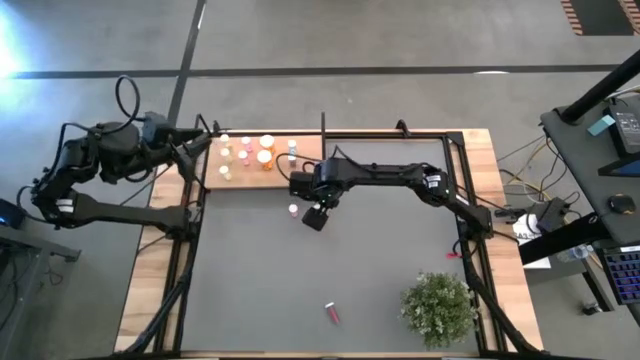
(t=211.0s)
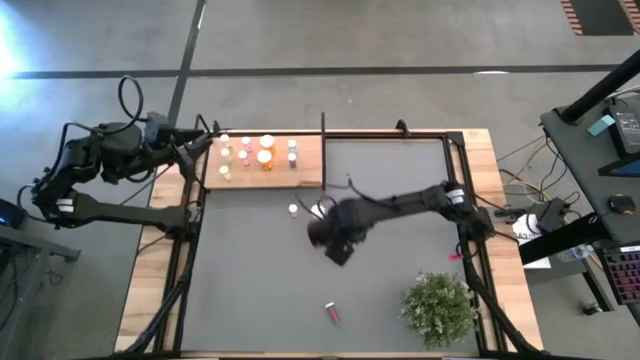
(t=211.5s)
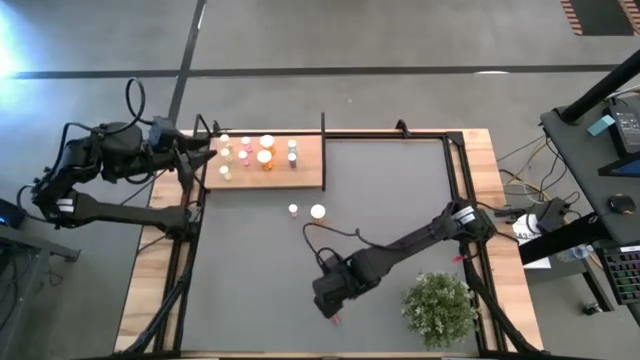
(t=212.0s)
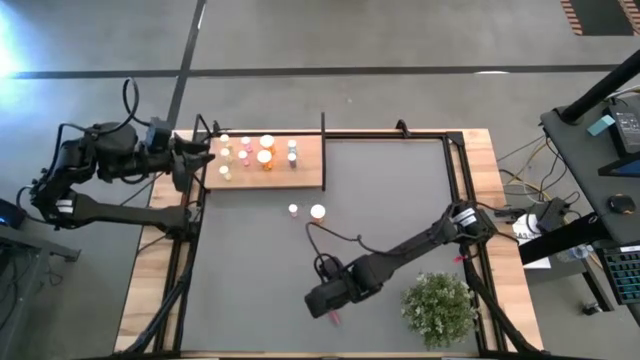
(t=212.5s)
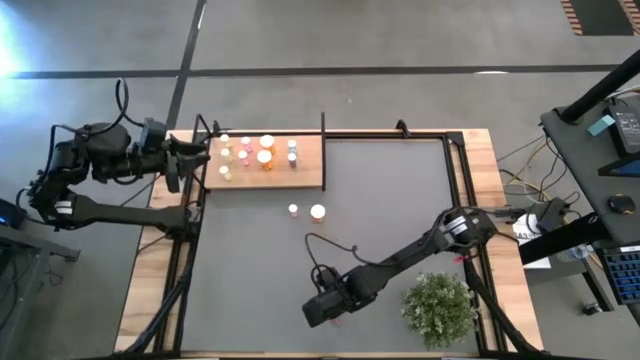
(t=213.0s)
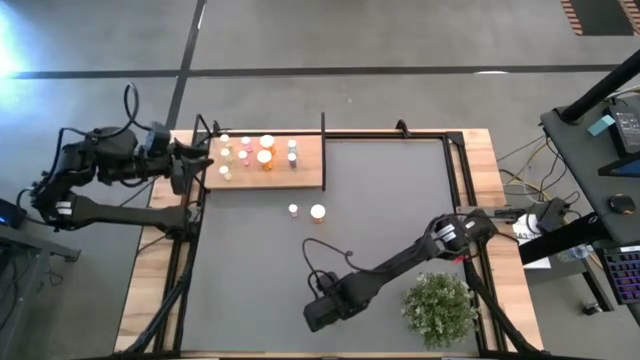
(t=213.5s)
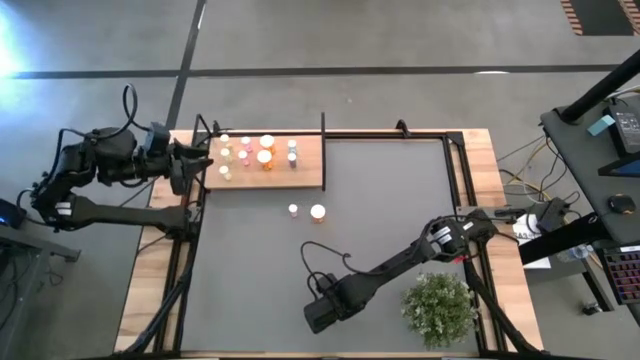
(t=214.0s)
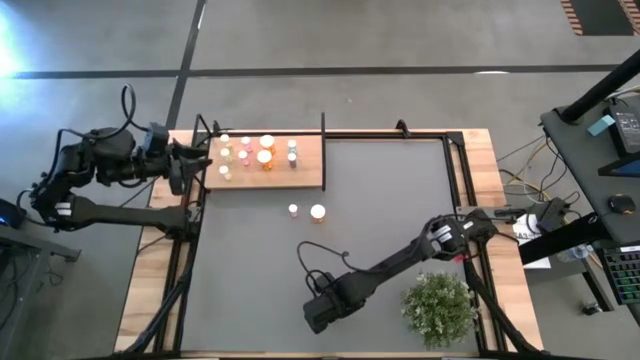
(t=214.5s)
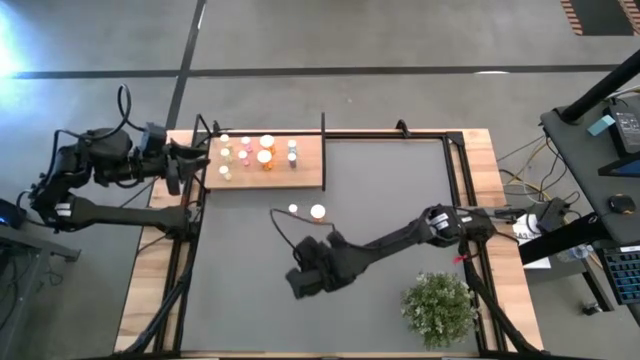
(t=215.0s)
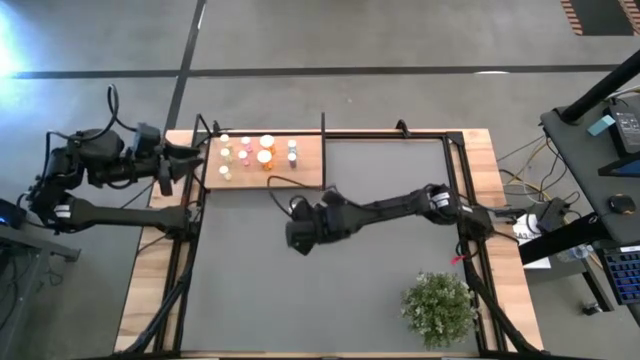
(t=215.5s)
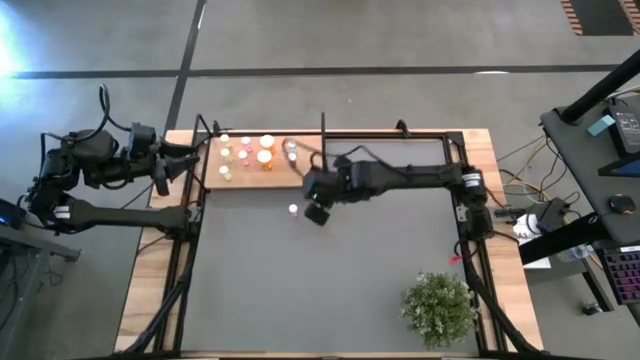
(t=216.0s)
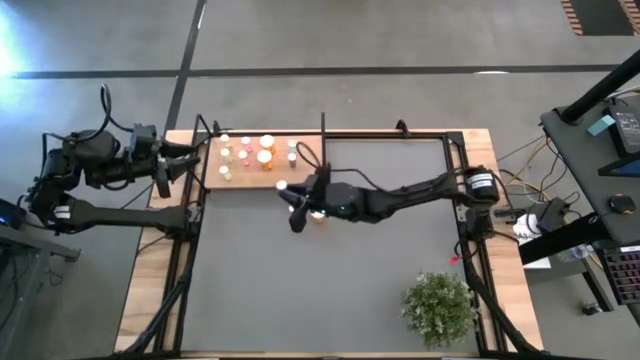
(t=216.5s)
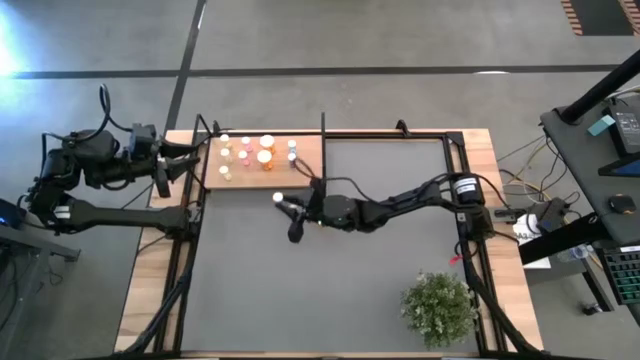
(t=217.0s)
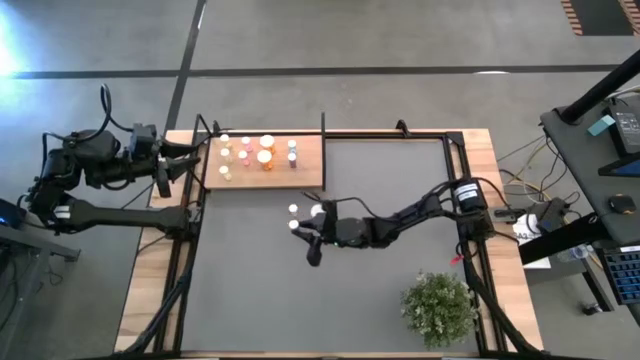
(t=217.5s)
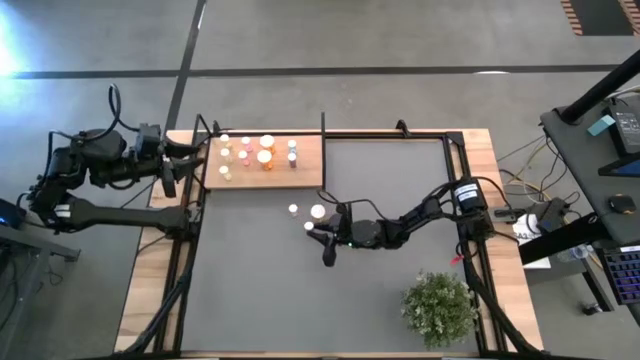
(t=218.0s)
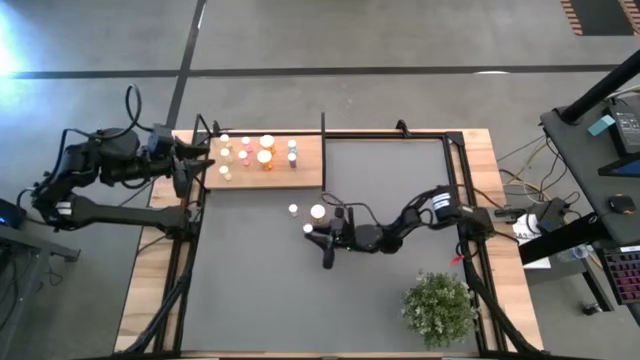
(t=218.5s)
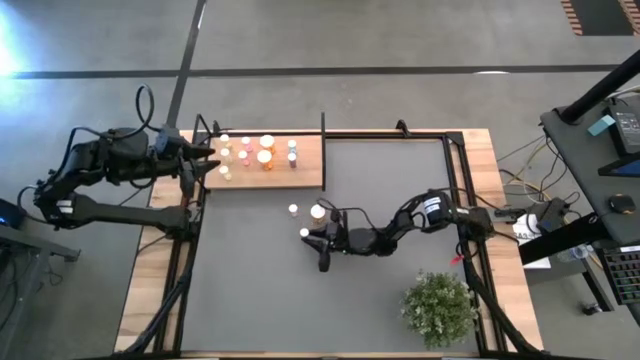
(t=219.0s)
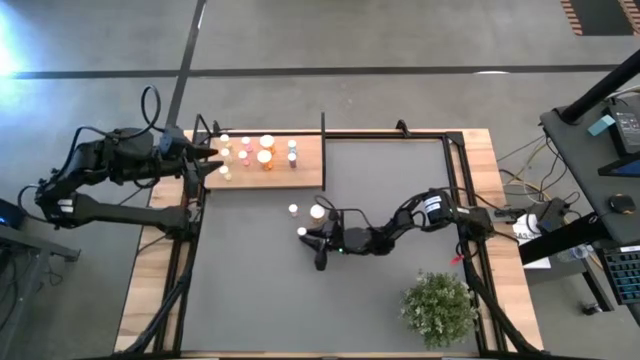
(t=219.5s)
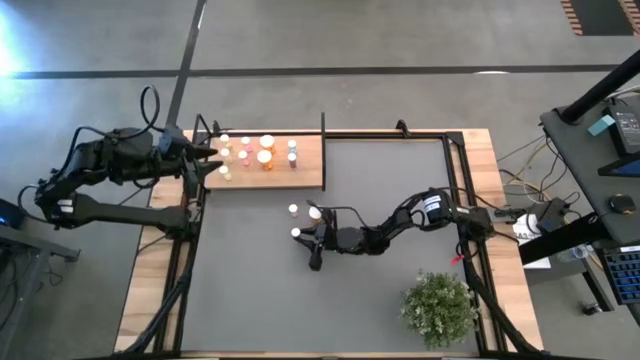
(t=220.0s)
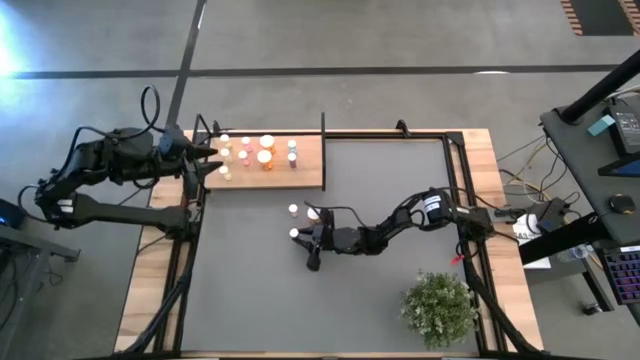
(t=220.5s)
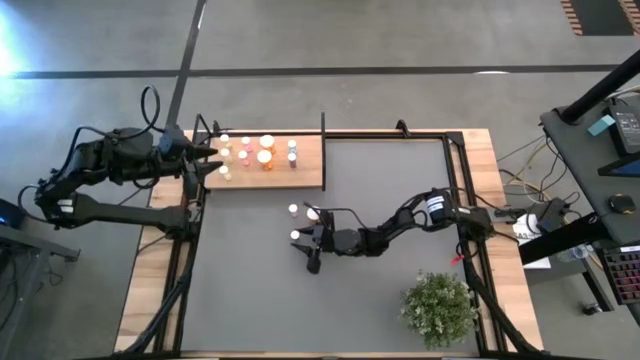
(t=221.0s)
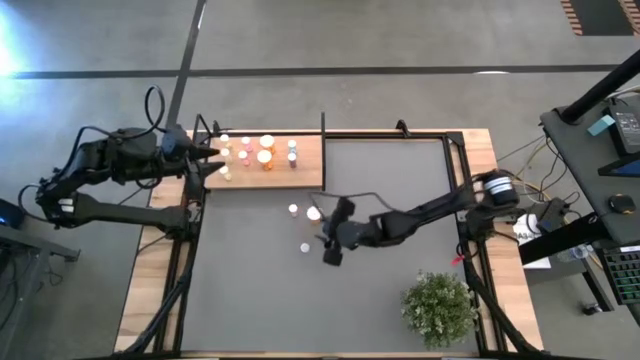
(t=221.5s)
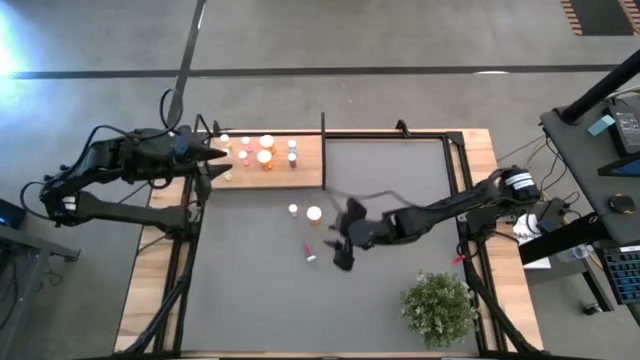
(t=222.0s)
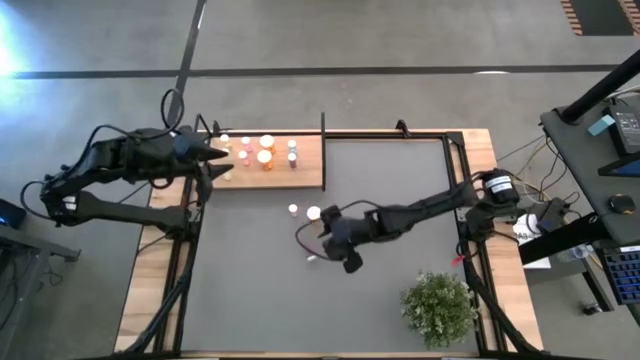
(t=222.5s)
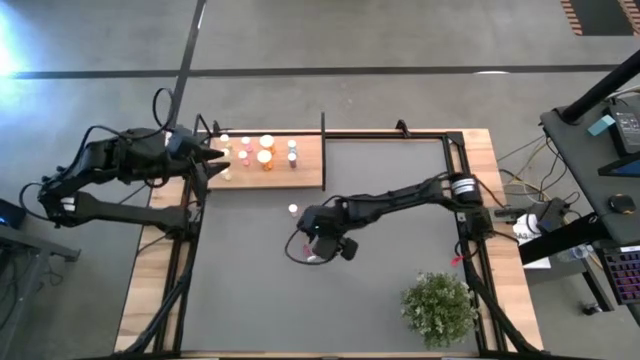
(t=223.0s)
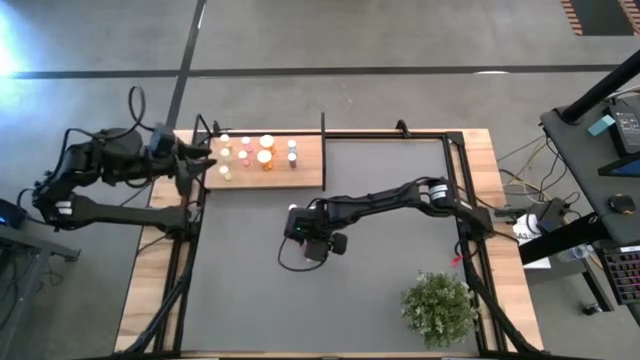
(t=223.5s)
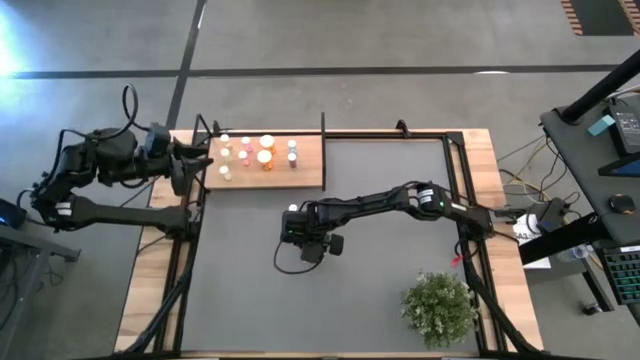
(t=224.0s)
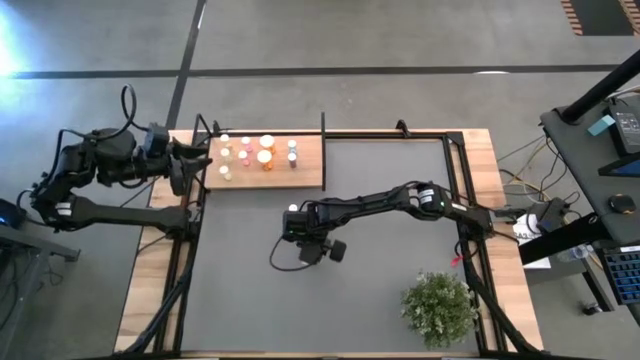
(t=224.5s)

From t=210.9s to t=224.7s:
Task: Pick and place medicine bottles onto shelf by color
Put the blue pill bottle on the shelf aligned with the other blue pill bottles

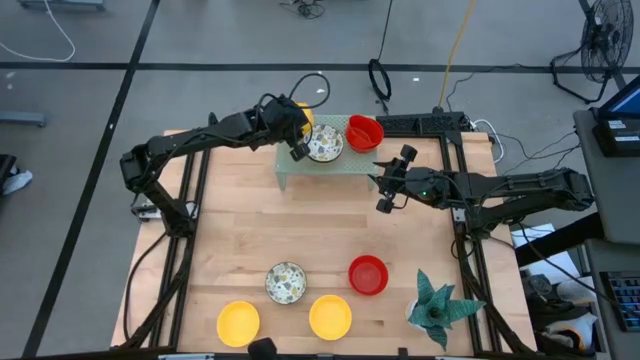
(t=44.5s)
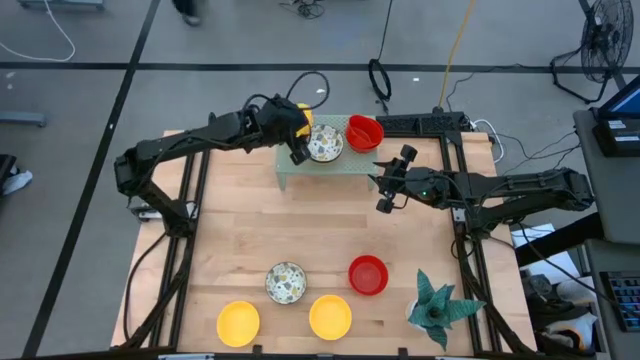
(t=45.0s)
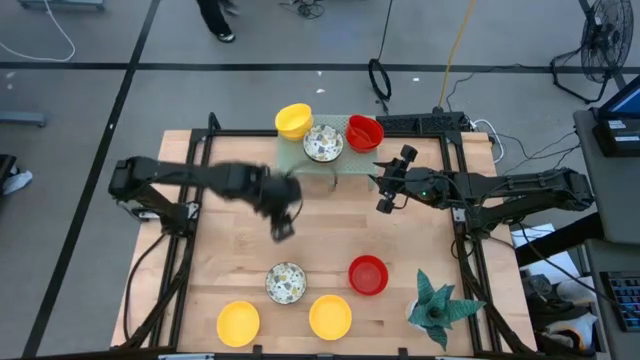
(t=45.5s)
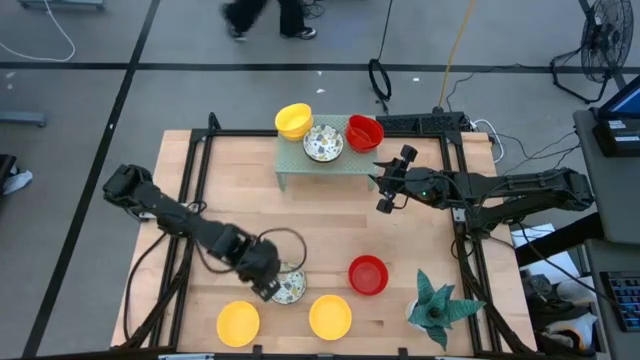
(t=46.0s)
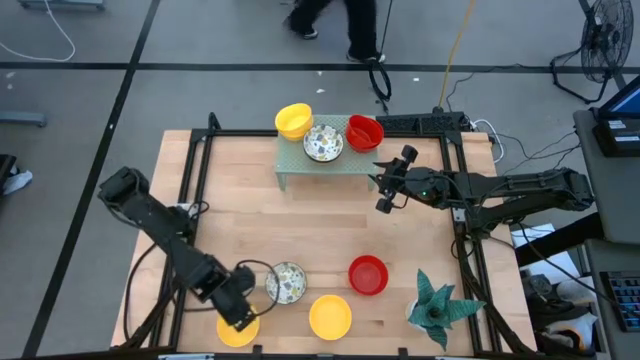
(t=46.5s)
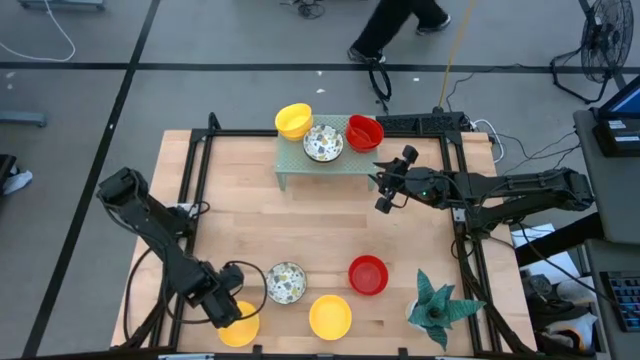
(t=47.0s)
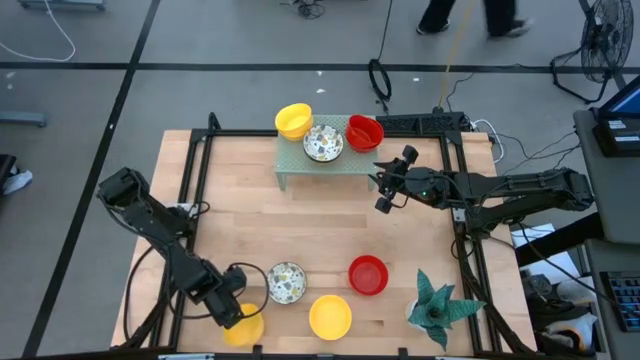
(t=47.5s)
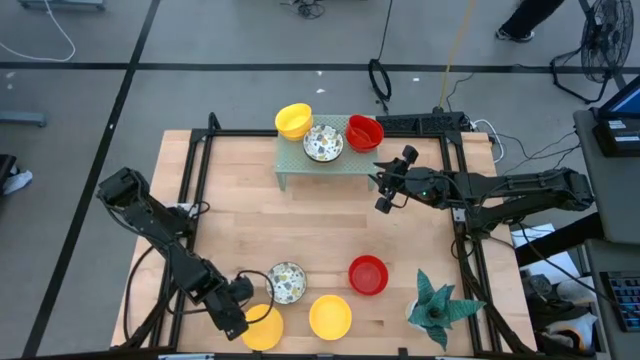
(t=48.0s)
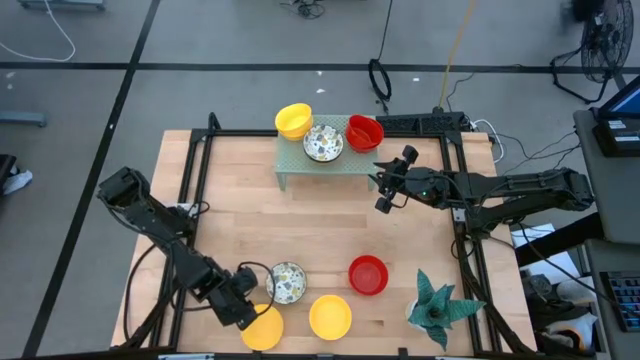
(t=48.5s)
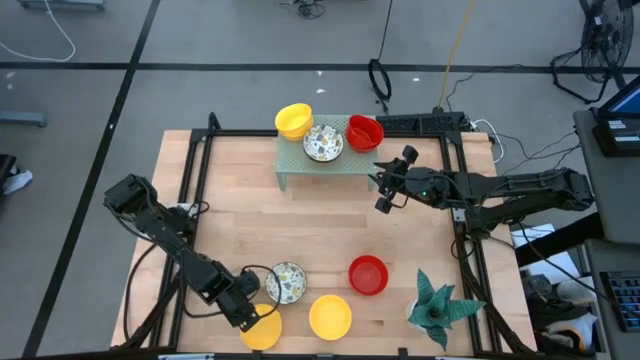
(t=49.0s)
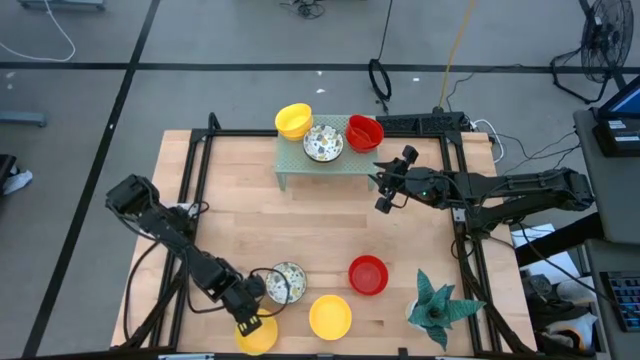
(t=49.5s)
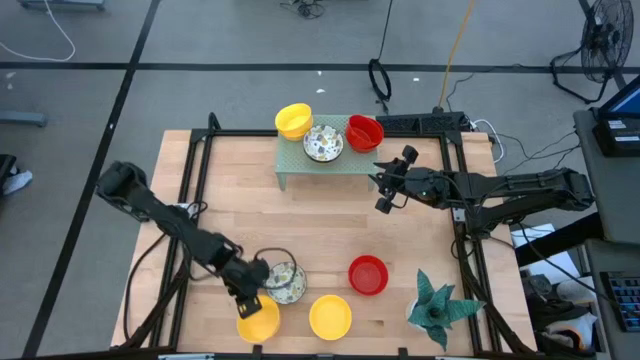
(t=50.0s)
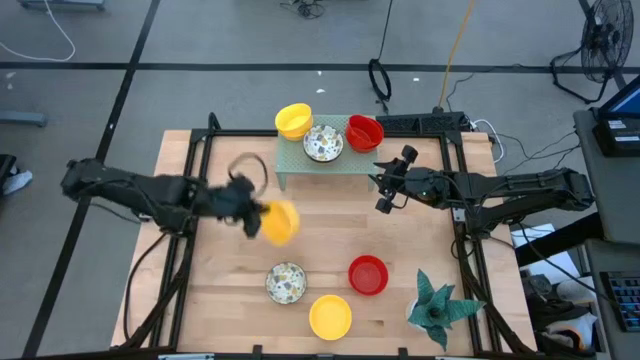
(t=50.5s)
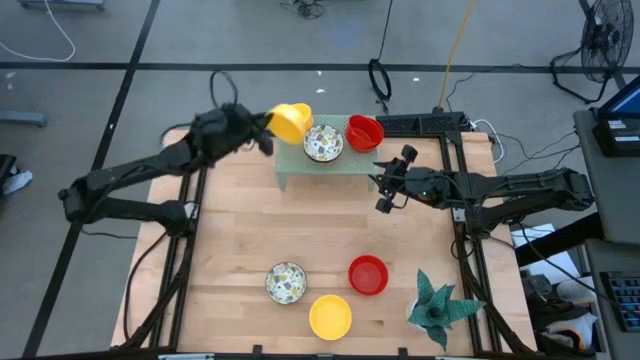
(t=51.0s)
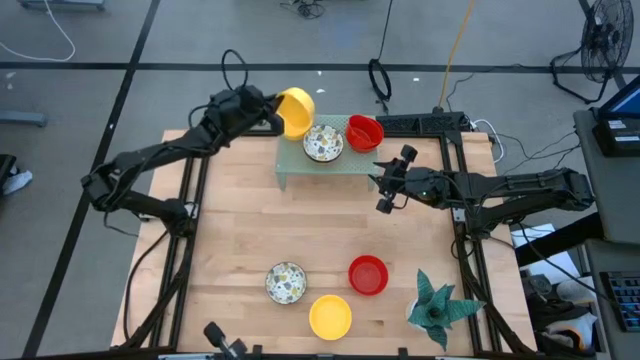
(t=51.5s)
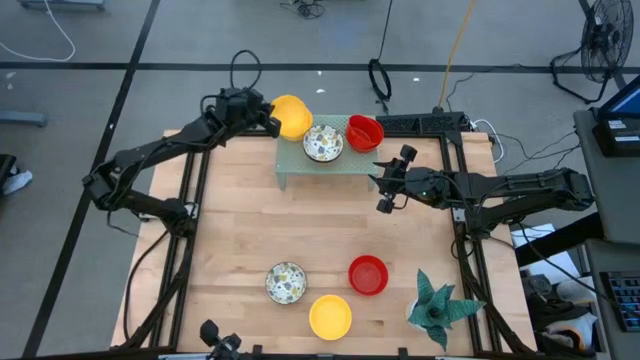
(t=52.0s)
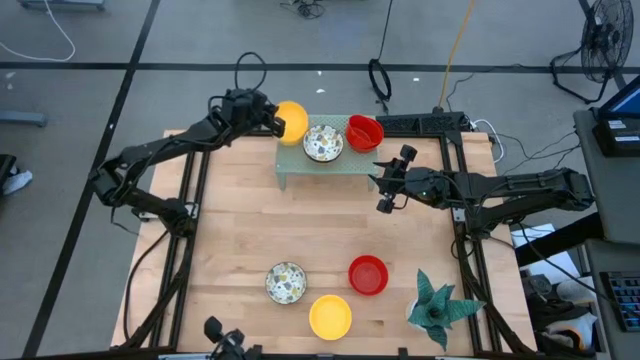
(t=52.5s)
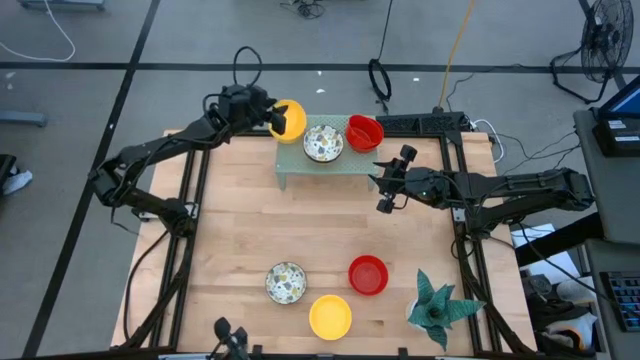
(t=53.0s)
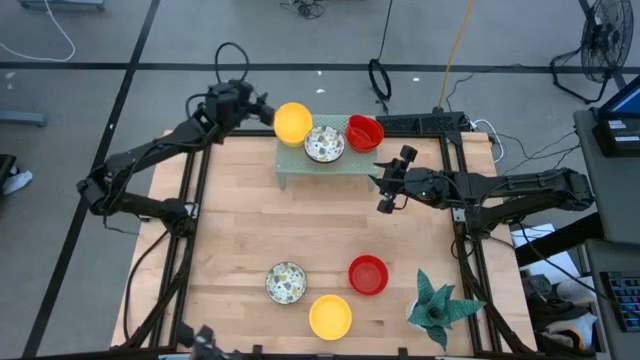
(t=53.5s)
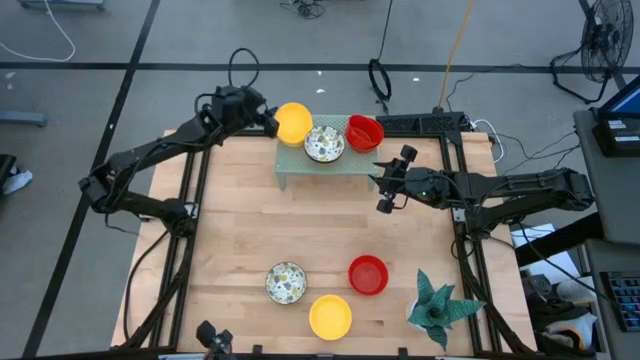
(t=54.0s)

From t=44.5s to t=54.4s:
Task: Pick & Place Mini bowls
Stack the yellow bowl on top of the yellow bowl on the shelf
